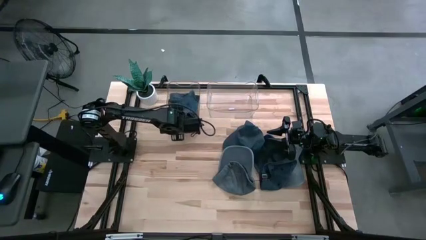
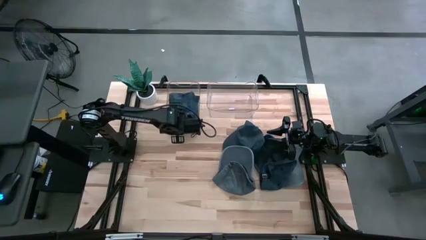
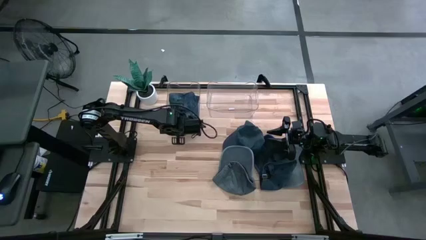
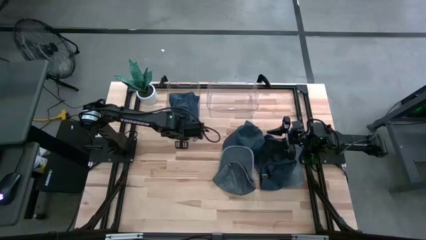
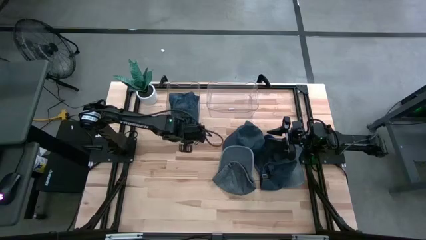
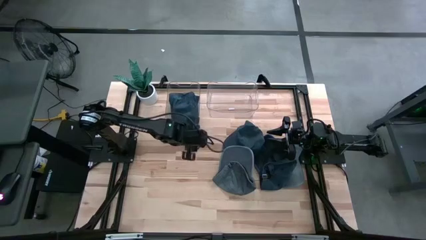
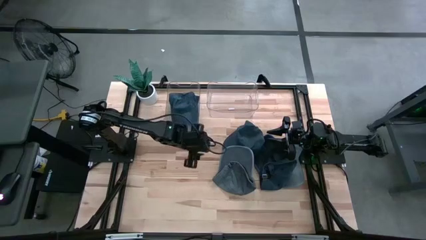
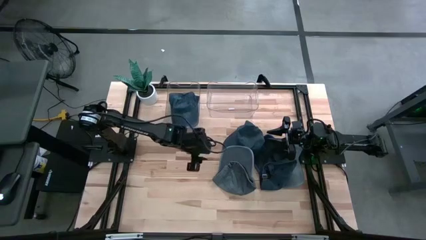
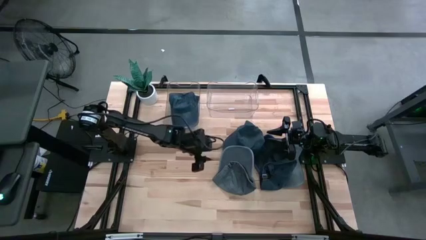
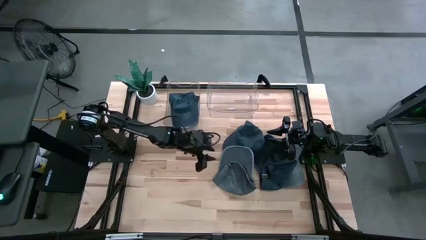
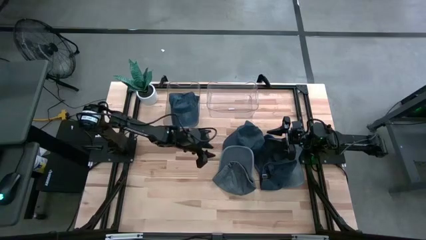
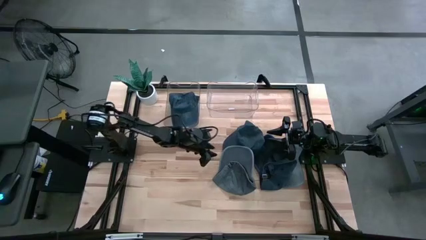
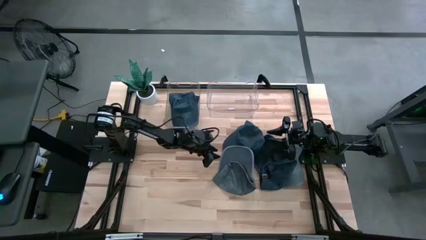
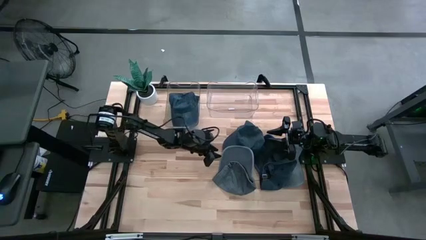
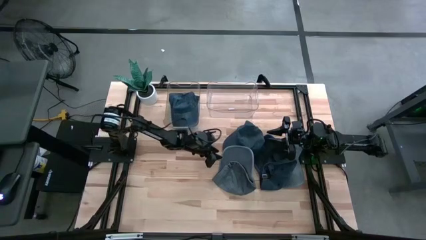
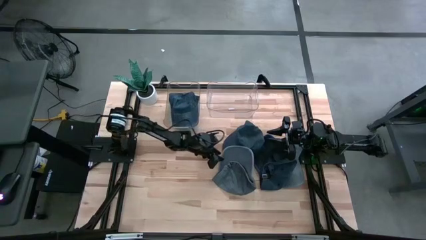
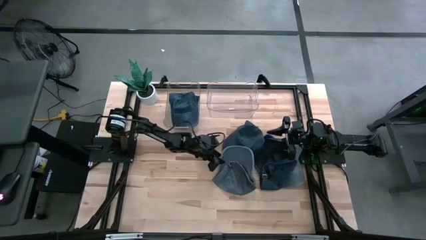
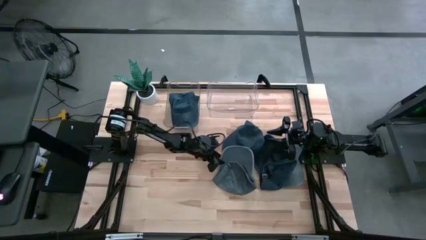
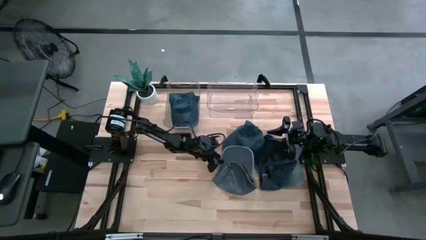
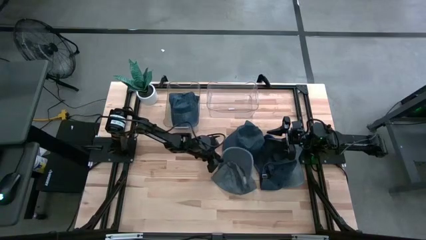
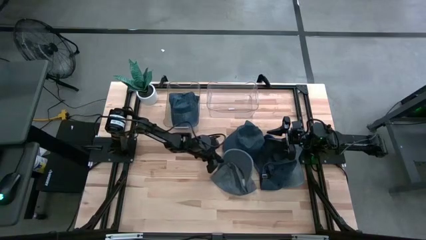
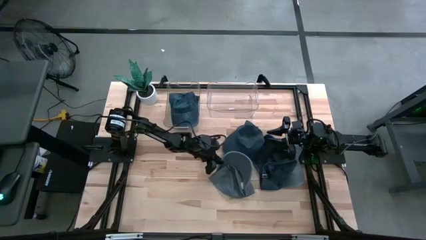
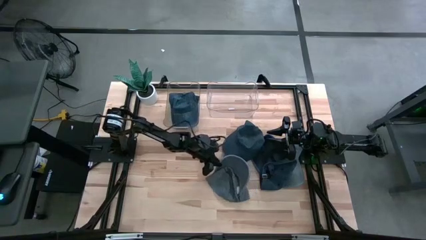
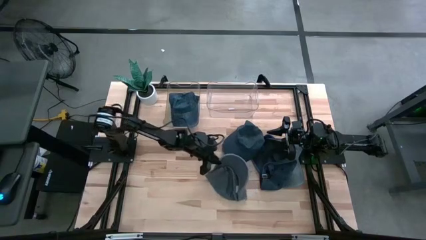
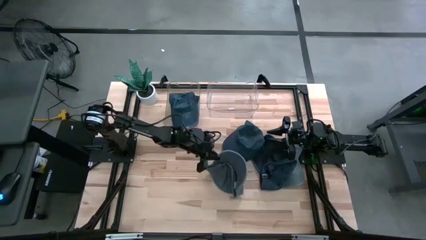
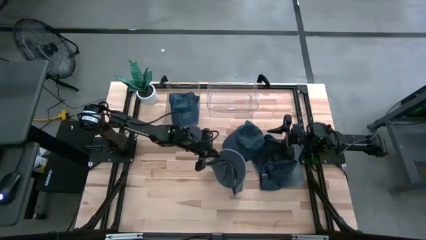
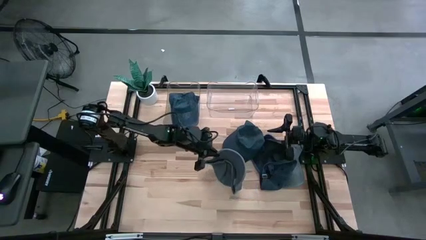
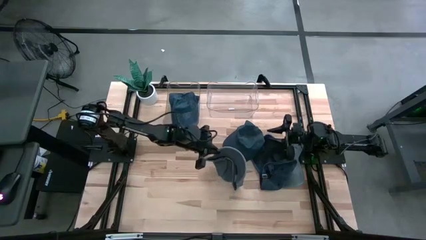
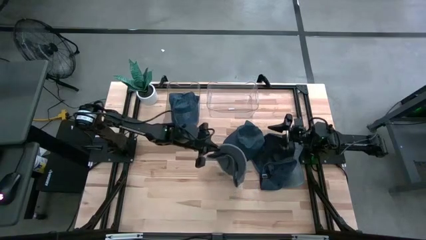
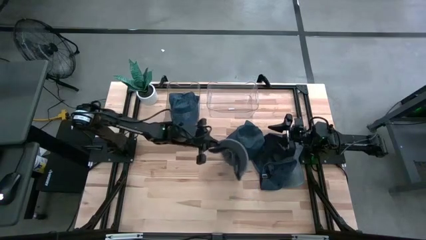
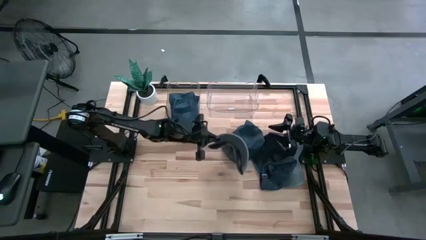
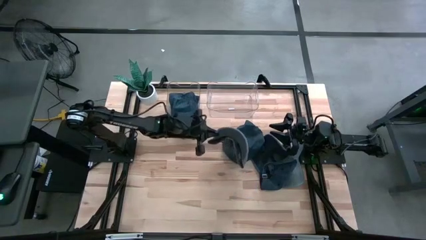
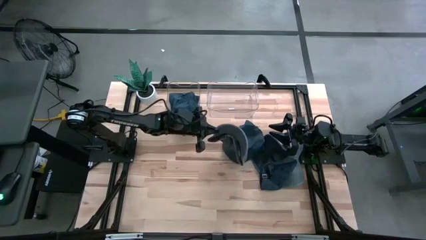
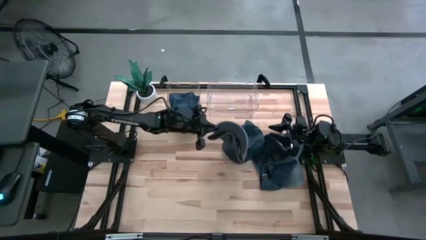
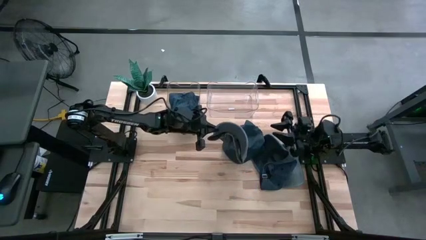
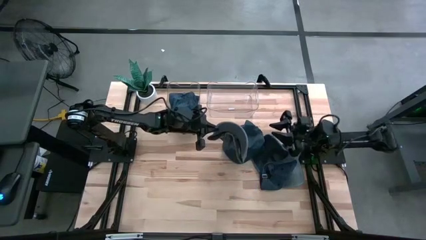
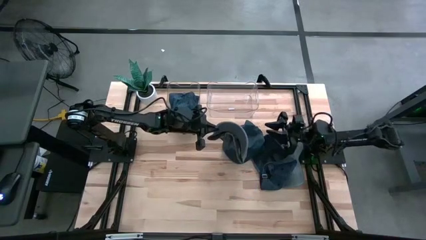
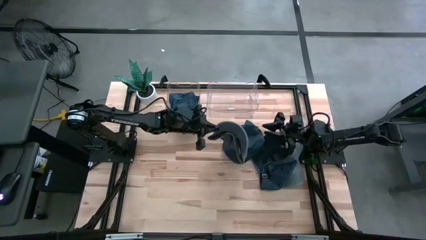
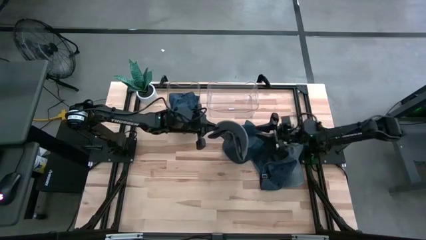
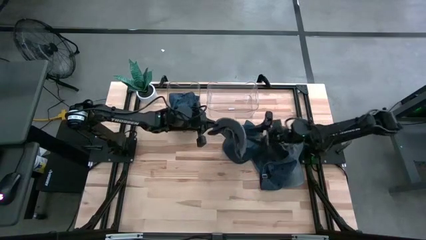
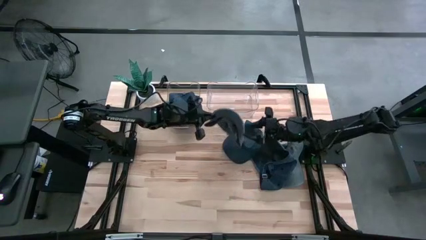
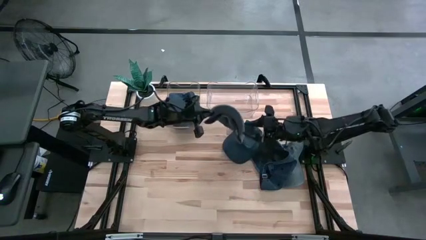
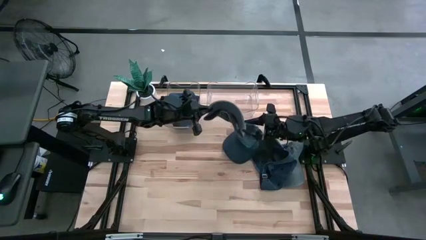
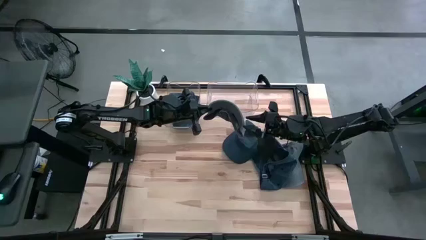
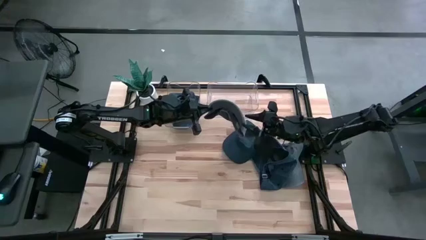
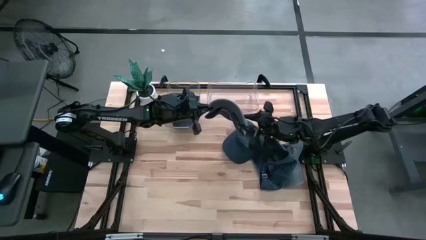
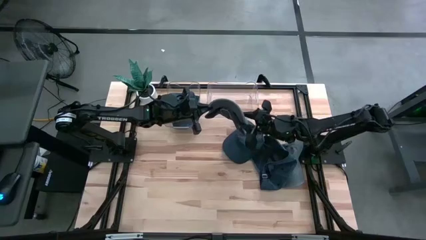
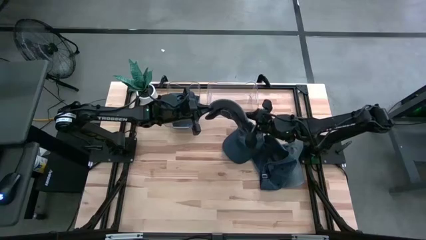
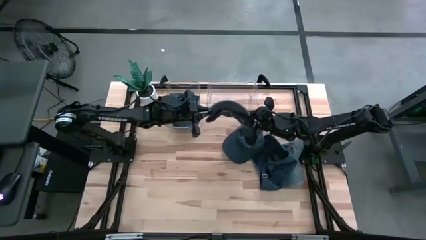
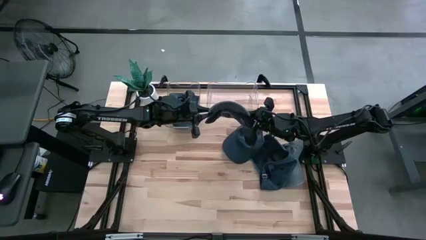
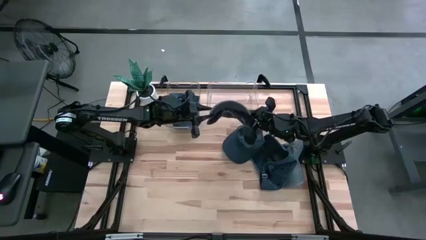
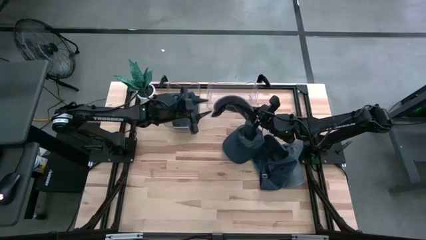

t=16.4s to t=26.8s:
Task: Pick & Place hat
Put the left gray cap into the right transparent bin
